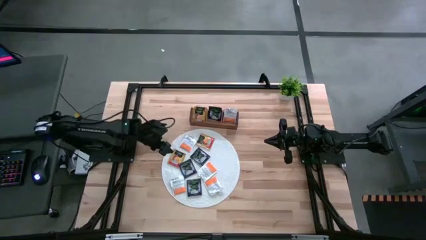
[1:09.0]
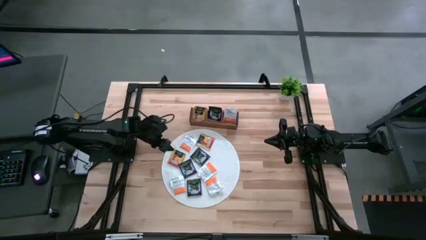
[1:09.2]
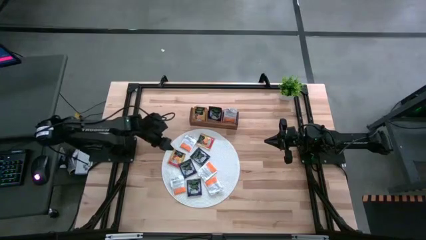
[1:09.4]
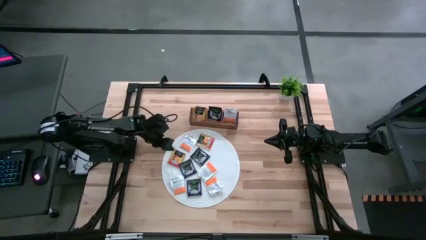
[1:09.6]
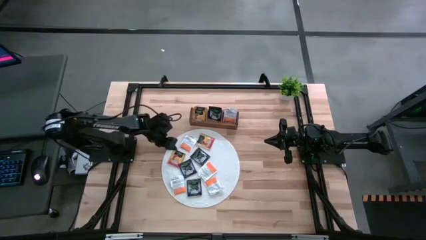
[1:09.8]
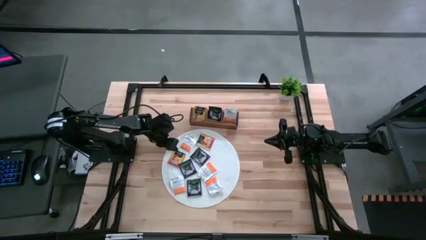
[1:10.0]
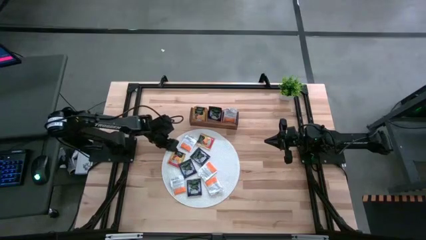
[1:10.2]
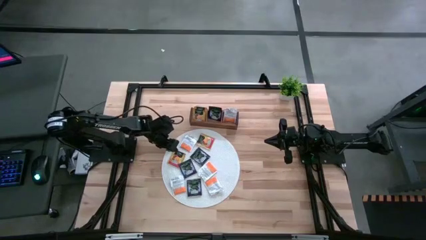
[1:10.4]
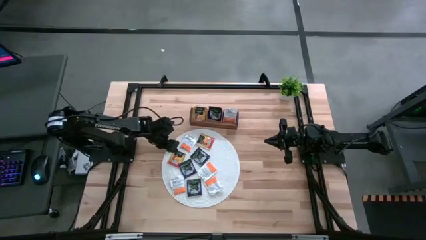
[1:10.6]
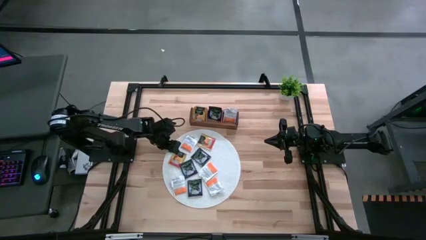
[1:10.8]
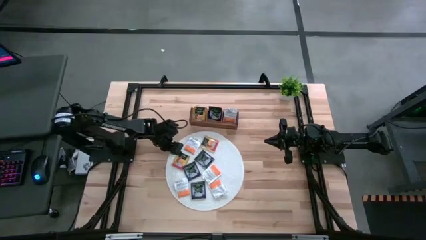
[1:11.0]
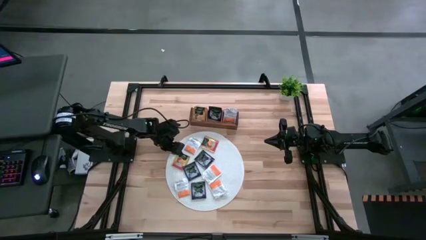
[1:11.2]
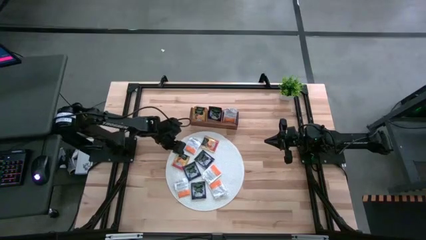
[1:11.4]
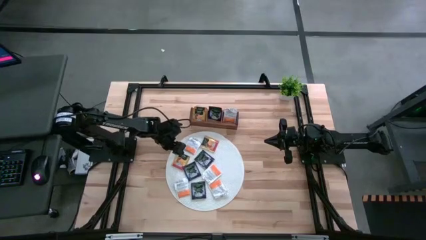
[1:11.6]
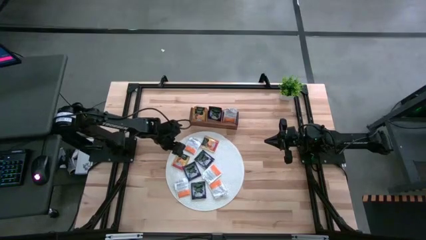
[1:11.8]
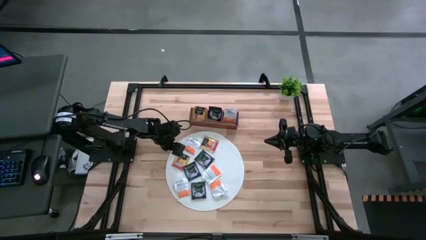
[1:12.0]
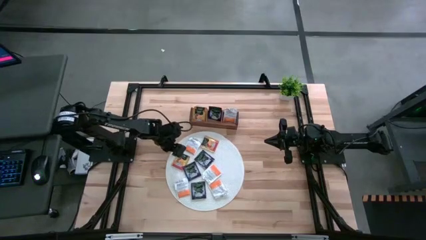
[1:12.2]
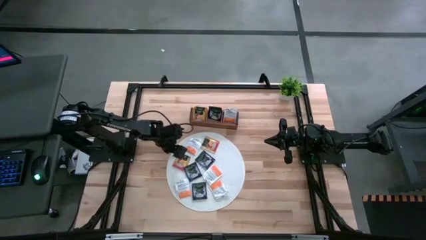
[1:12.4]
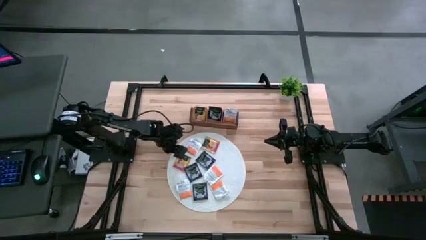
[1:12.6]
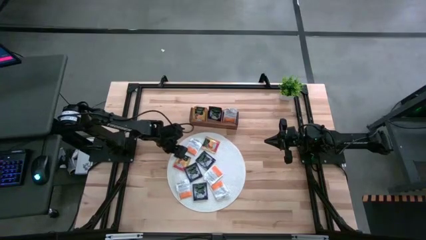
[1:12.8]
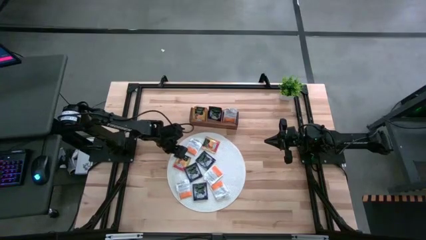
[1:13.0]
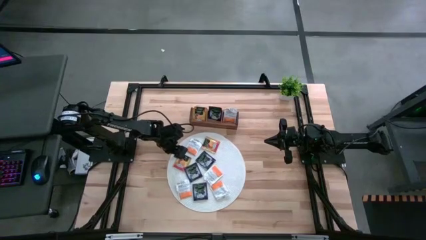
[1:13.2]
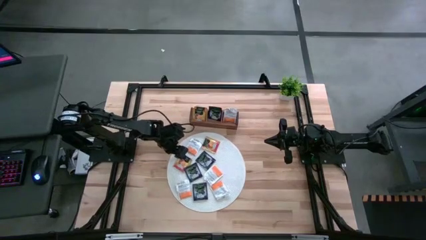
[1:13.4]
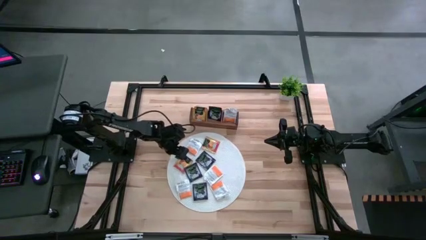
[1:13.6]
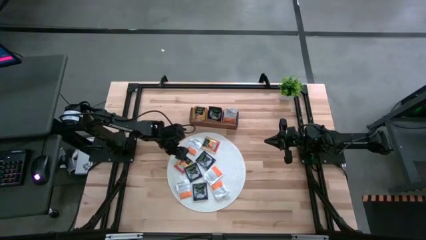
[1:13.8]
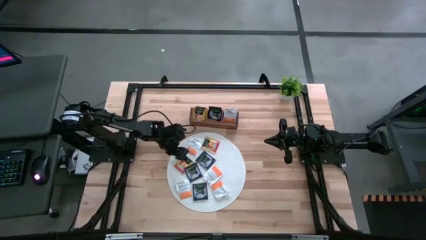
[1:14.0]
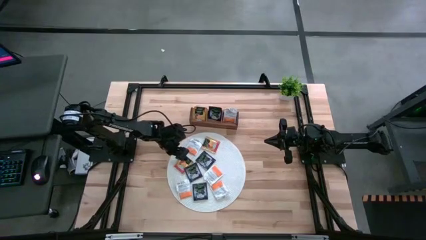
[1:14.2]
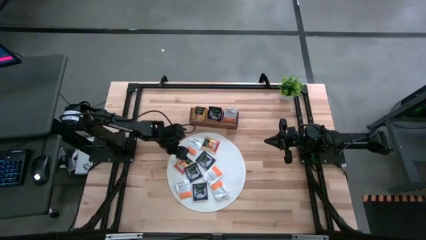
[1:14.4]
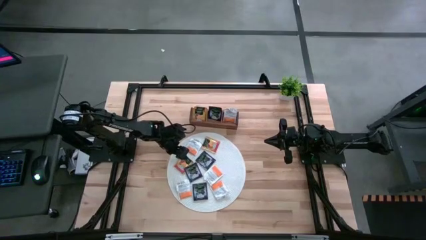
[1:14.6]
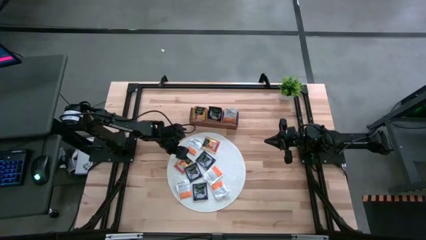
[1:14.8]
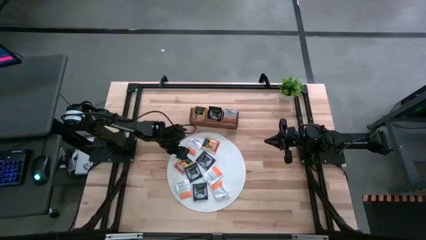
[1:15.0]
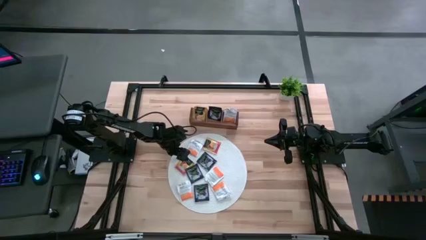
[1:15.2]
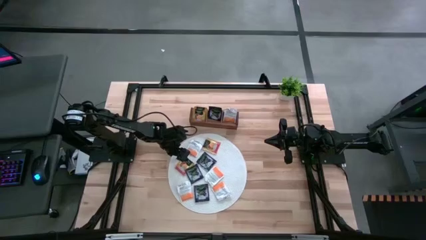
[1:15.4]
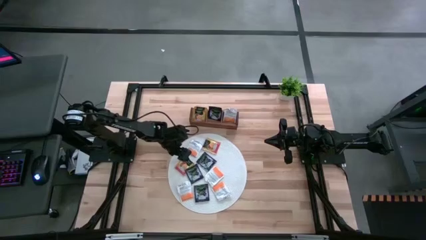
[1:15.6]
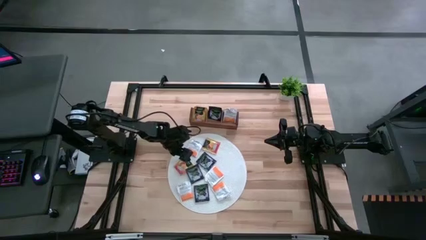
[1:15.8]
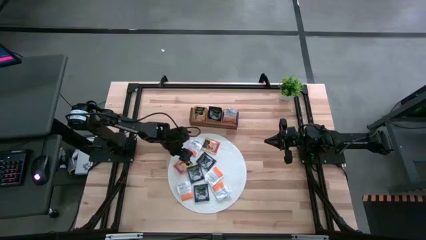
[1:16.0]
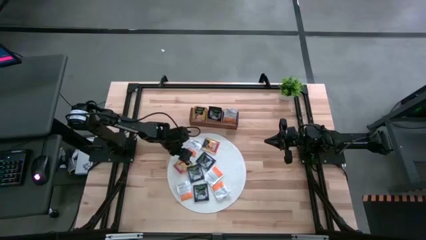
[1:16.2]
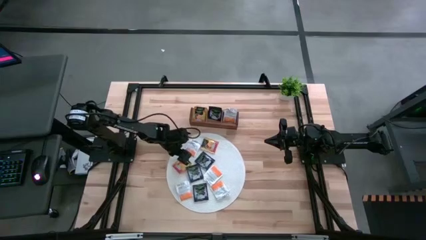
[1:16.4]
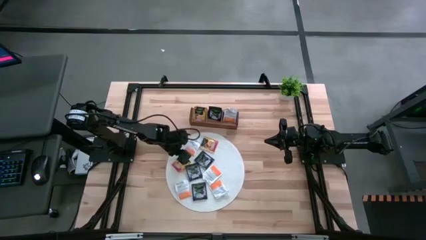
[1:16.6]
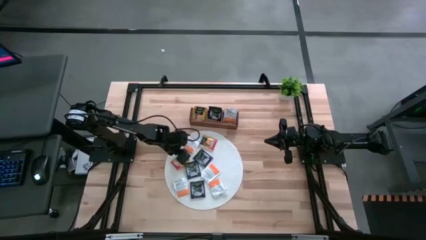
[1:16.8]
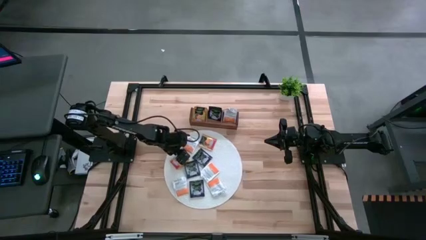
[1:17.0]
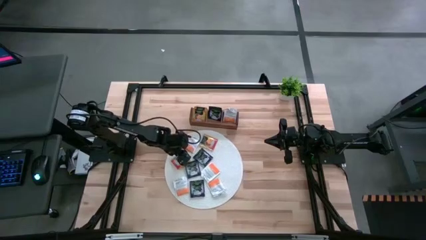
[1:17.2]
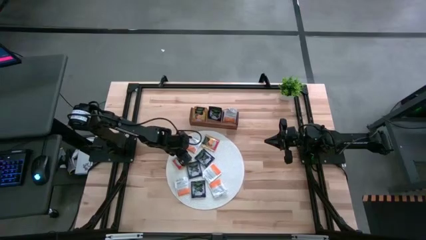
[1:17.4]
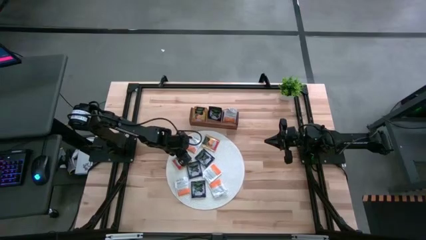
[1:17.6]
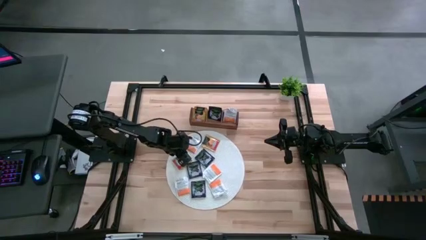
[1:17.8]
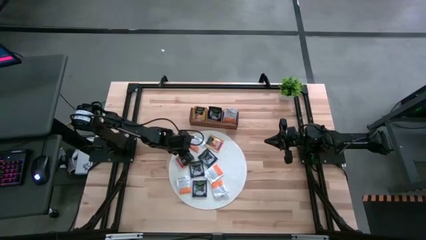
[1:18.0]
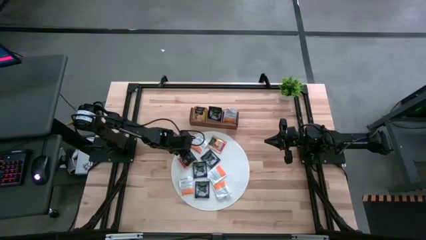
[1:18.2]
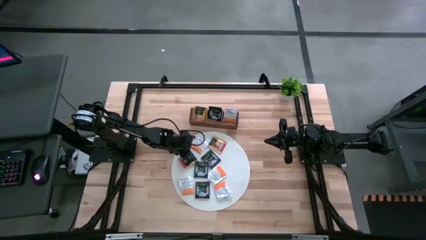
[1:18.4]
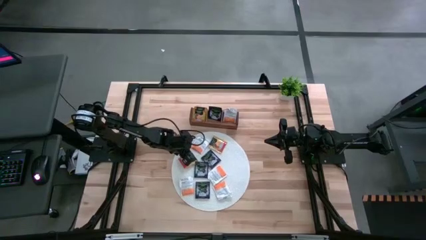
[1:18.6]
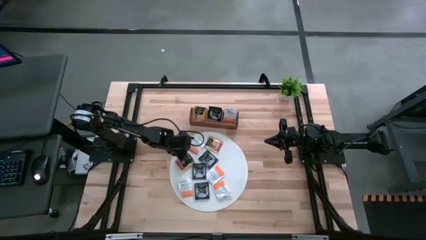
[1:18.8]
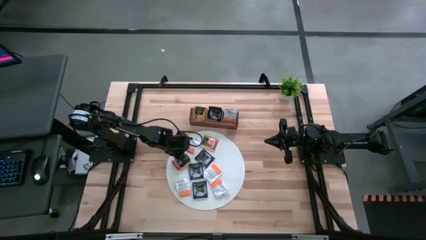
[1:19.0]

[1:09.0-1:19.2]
Task: Pick & Place Tea
Put the yellow tea bag into the left section of the wooden organizer

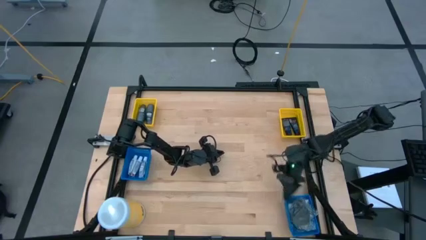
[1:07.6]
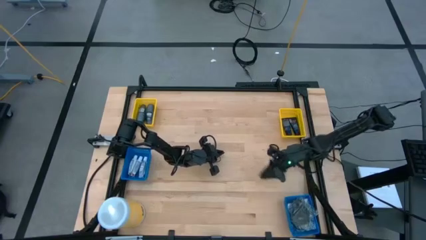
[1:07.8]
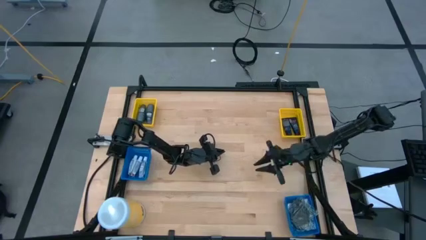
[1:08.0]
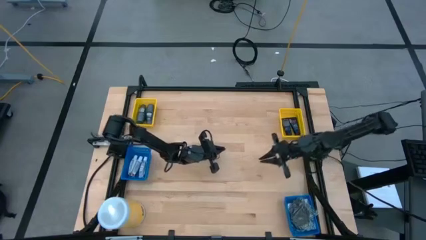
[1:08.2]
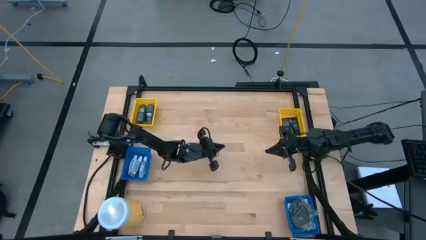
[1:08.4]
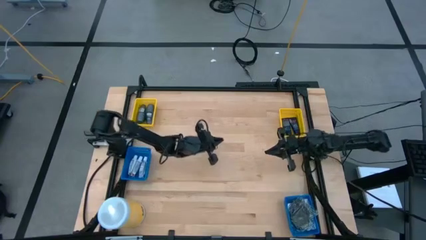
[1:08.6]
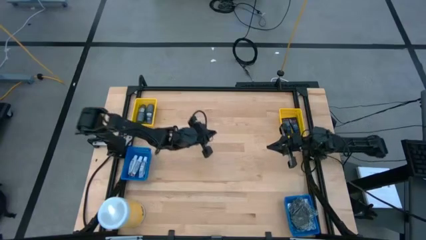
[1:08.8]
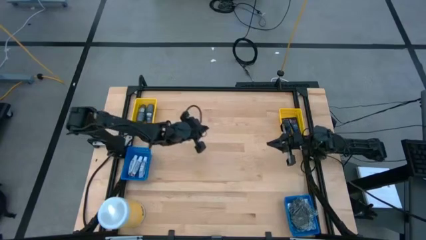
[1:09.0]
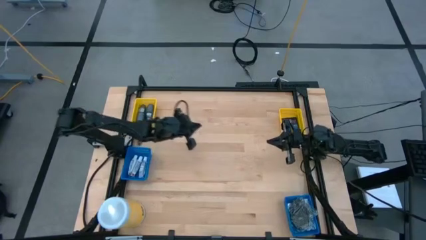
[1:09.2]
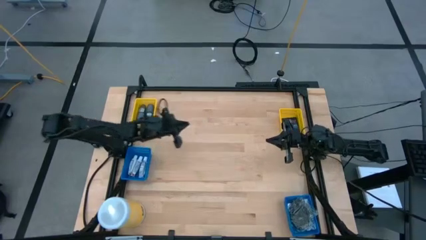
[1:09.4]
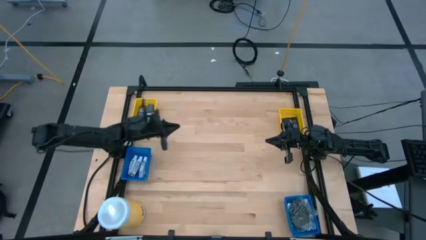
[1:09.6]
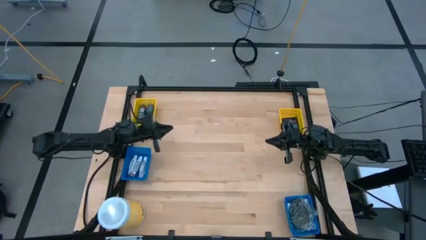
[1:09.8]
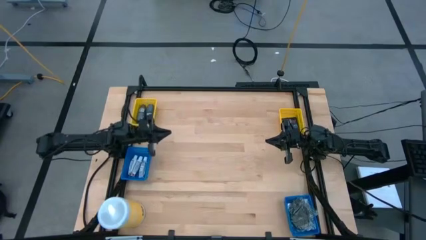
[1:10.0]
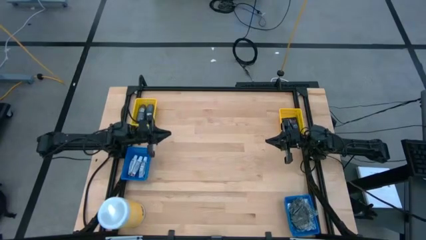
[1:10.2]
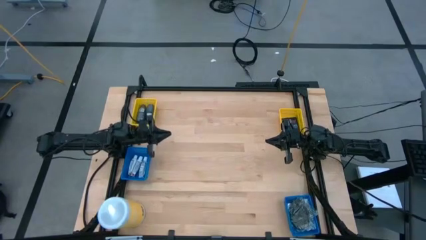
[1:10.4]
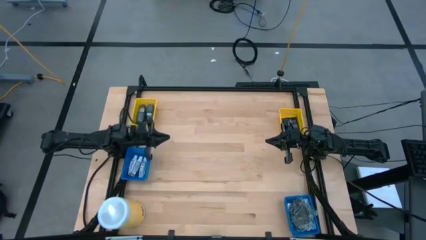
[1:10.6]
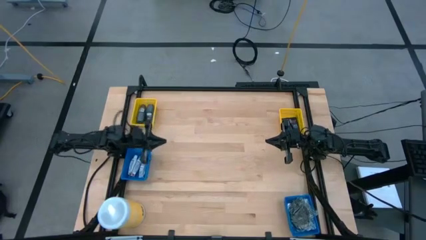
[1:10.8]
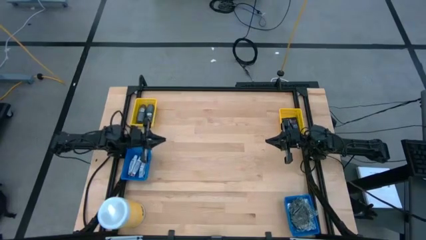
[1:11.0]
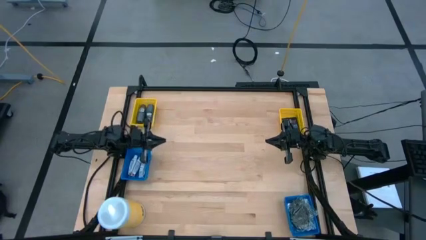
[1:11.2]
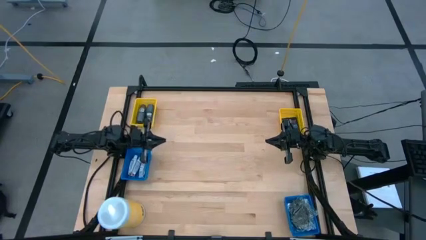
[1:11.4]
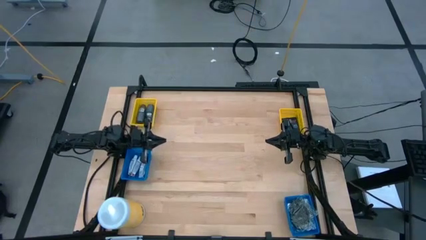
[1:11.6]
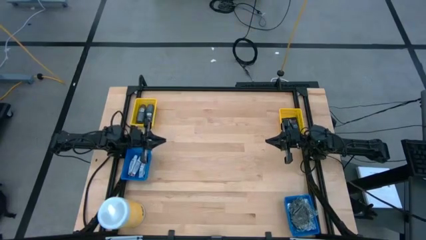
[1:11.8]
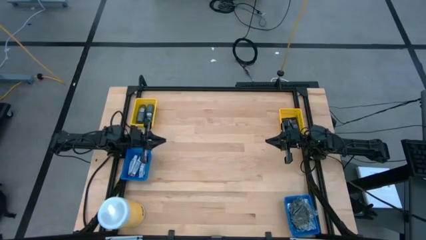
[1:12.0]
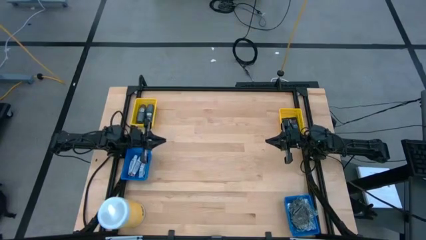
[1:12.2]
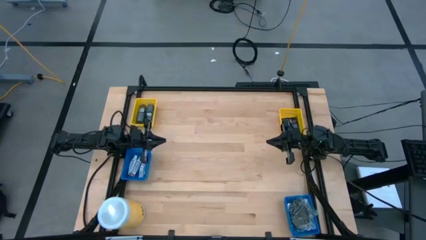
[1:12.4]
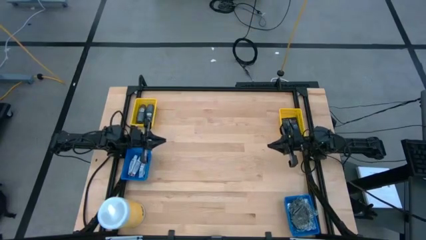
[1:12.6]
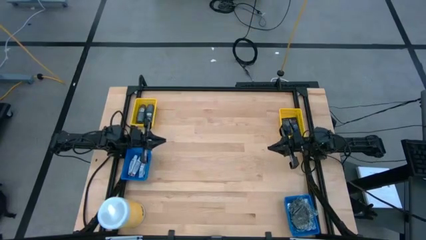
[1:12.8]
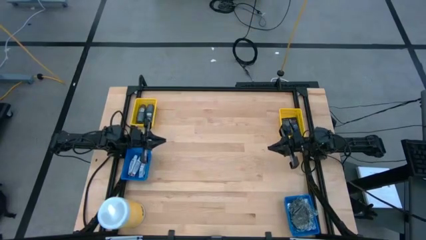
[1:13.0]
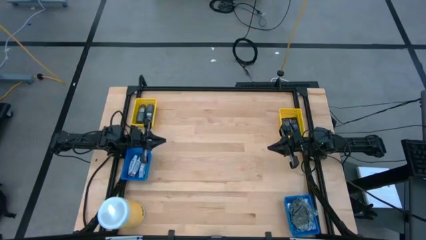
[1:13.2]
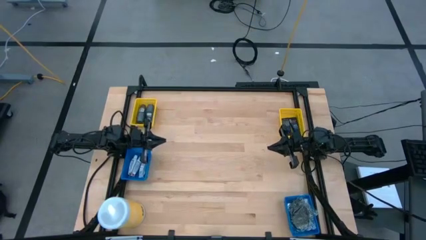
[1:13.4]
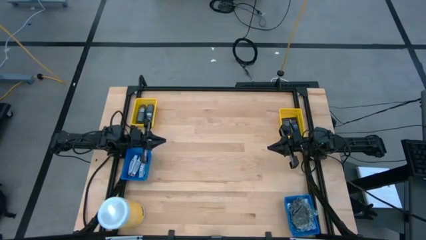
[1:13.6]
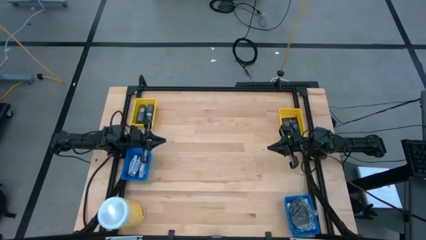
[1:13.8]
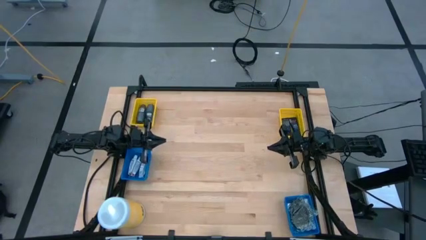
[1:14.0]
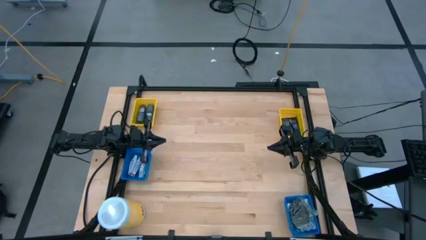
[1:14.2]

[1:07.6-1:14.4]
Task: Pick & Place Travel size toiletries
Return to Home Position
